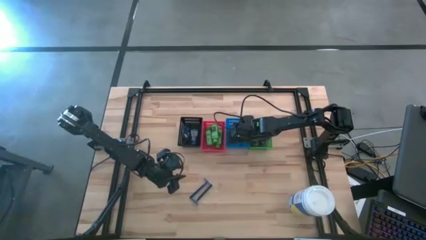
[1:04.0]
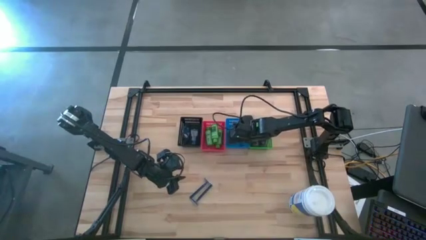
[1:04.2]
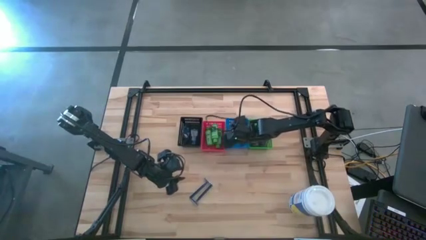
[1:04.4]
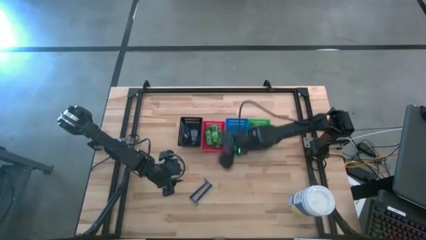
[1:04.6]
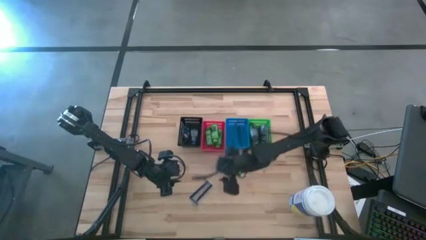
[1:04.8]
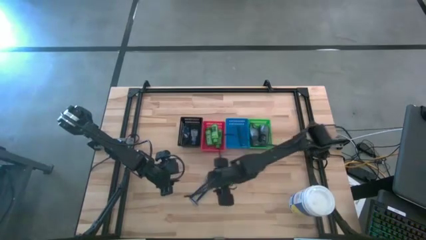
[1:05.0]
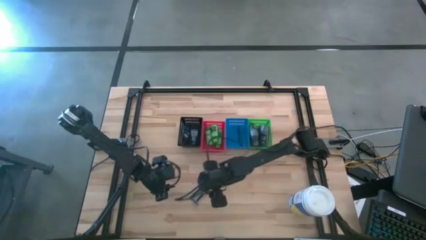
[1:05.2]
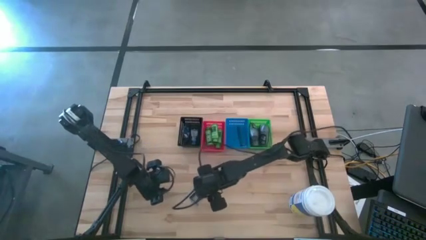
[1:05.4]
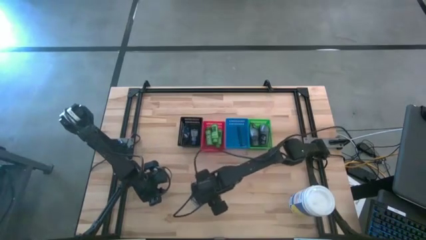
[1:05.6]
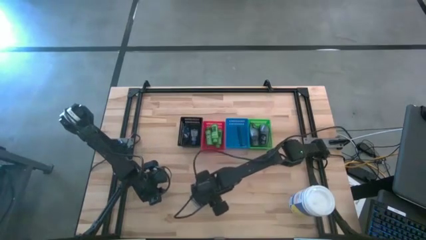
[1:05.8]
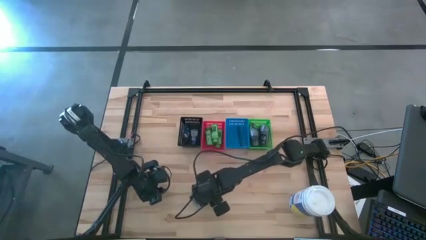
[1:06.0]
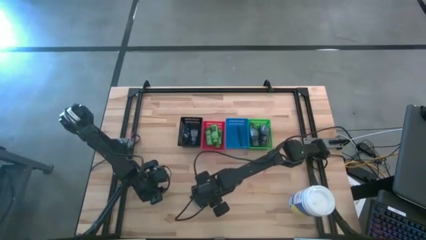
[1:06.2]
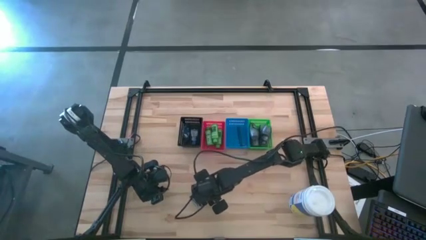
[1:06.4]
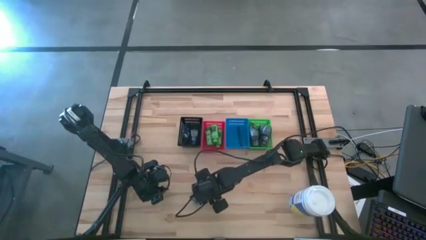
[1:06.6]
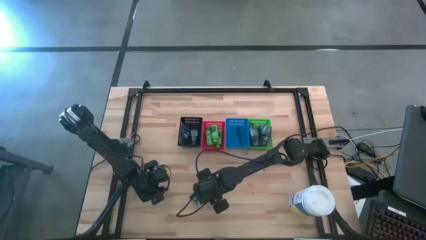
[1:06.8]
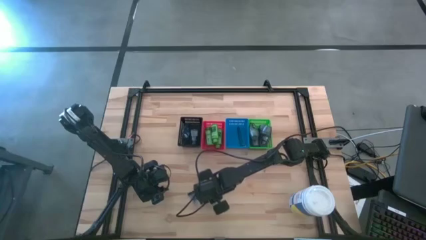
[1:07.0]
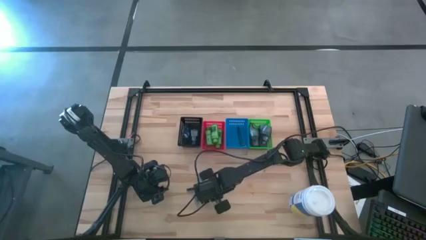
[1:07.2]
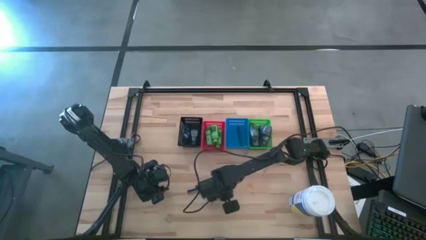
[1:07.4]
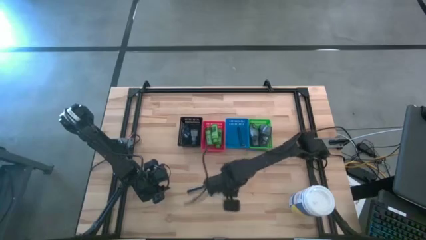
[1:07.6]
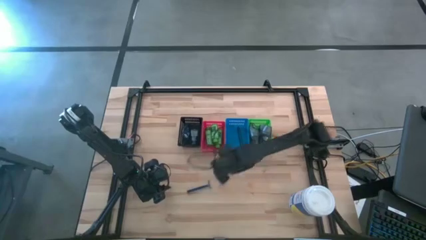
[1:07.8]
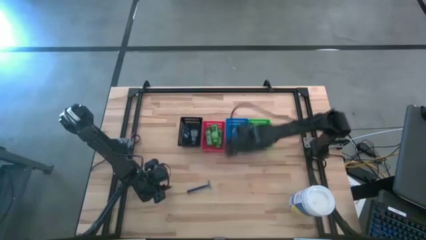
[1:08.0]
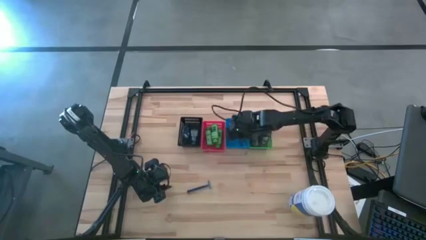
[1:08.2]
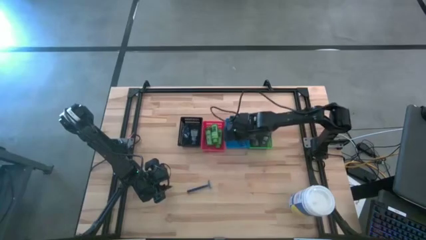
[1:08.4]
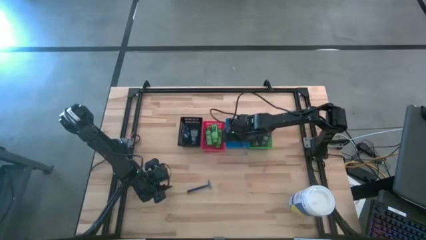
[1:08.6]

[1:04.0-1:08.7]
Task: Pick & Place Travel size toiletries
Put the blue razor into the blue basket

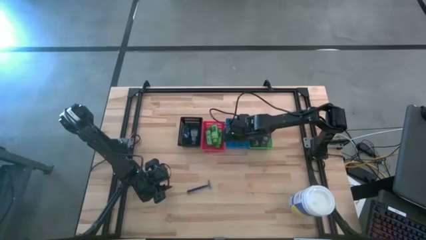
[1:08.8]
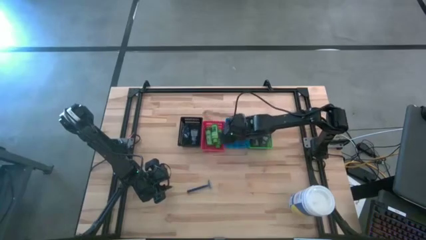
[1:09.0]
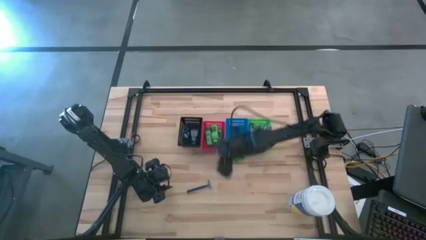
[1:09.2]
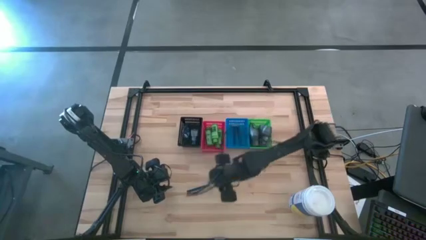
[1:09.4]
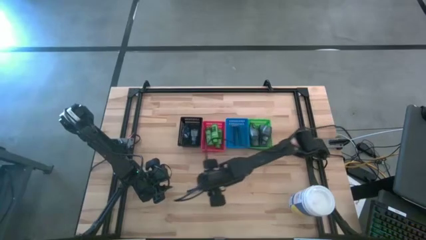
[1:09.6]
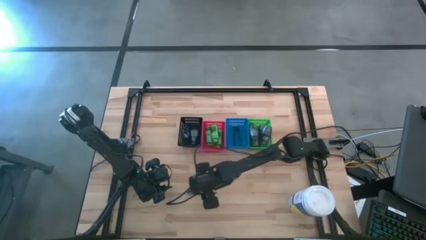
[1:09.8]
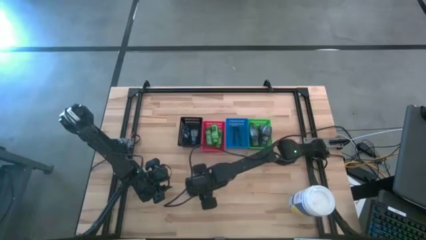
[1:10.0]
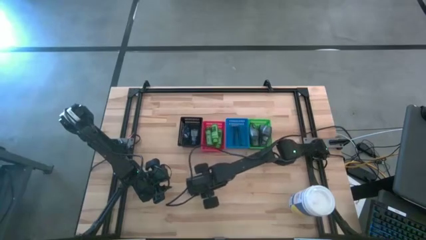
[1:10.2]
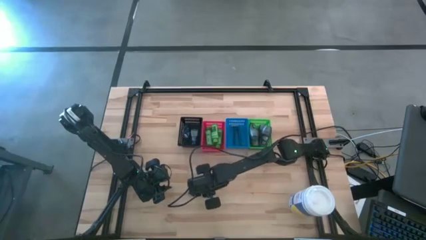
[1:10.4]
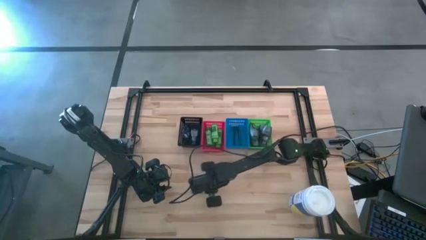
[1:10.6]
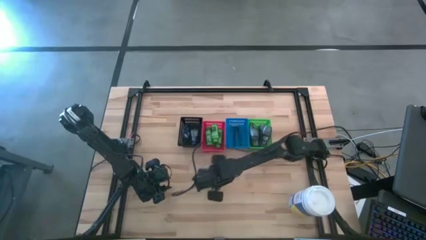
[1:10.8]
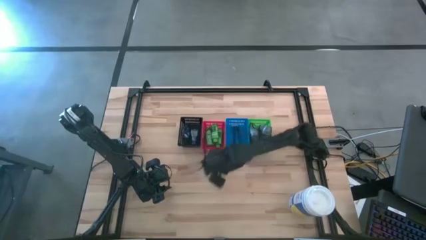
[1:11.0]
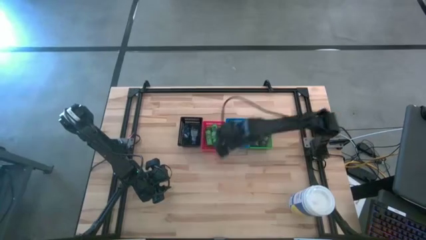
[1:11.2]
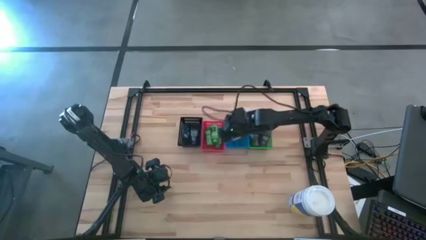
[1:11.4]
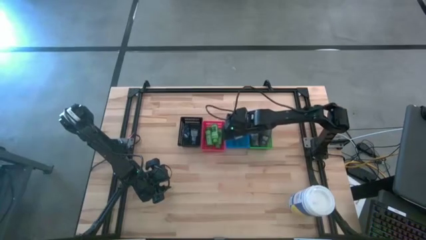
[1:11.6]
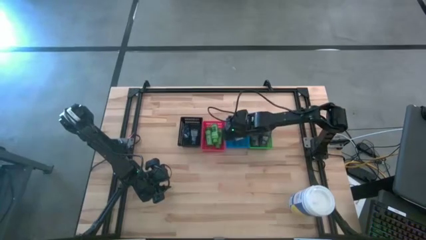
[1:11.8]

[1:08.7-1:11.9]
Put the blue razor into the blue basket

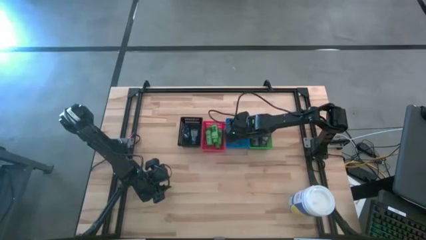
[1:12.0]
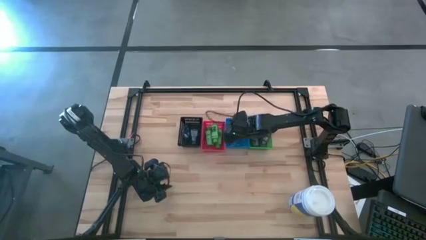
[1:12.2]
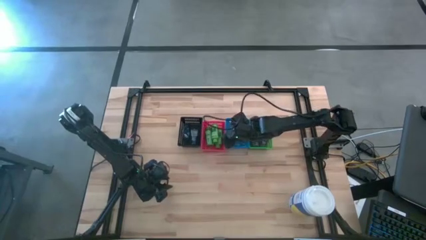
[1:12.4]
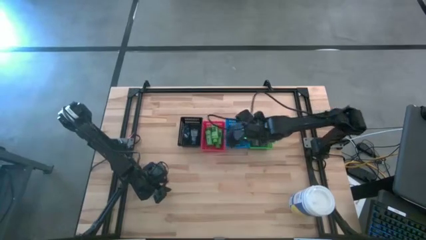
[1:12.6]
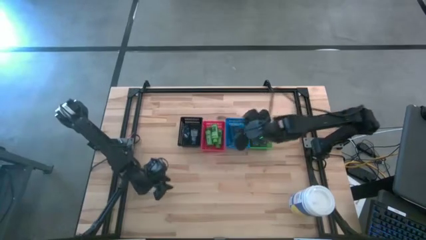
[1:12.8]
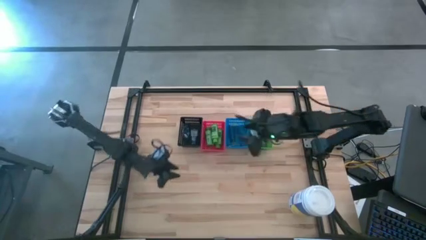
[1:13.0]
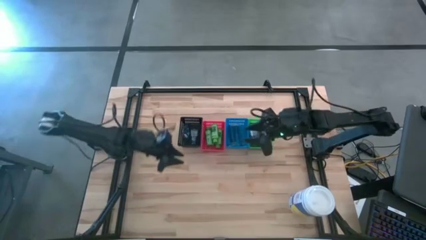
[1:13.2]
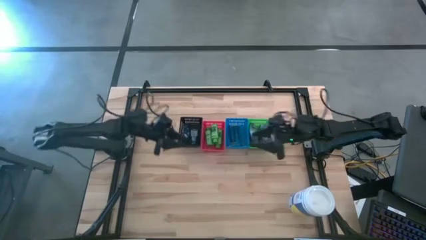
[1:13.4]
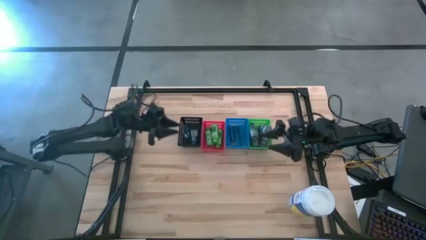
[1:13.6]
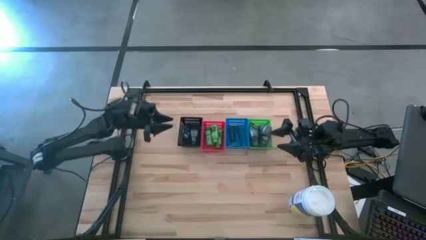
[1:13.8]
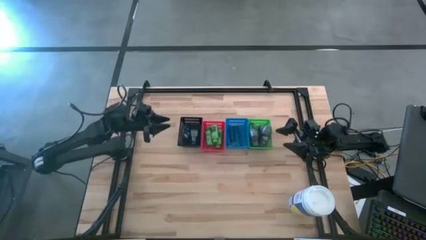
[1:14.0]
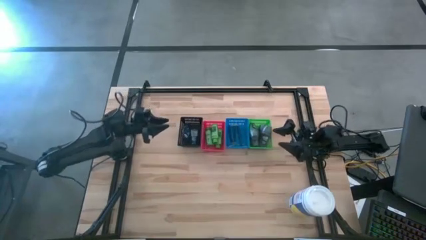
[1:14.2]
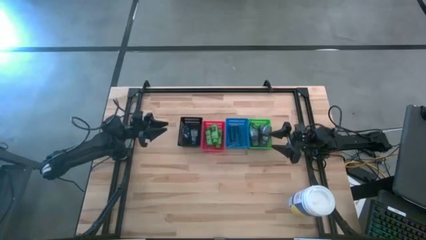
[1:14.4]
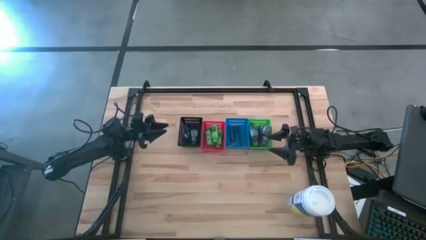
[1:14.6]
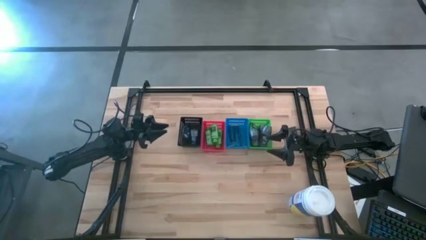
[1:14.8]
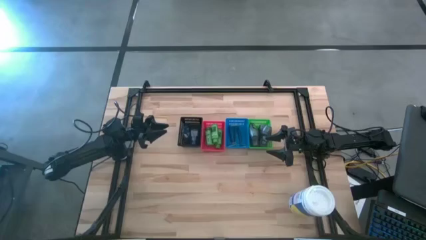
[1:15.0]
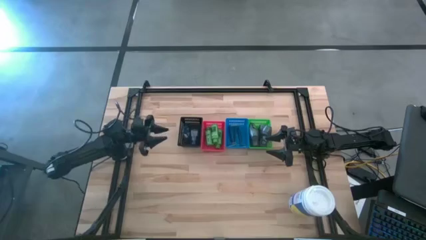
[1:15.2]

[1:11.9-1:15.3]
Return to Home Position

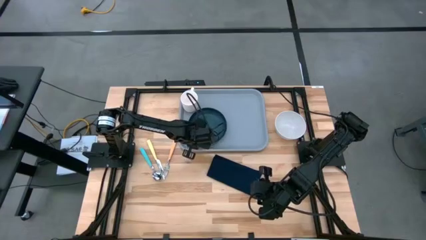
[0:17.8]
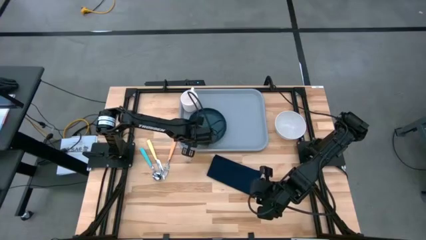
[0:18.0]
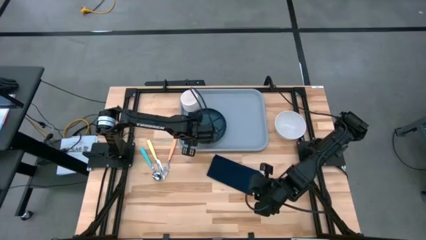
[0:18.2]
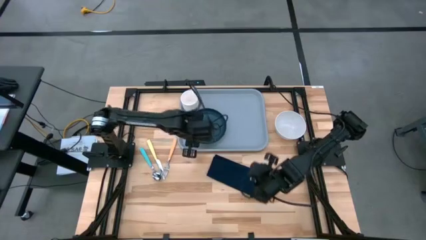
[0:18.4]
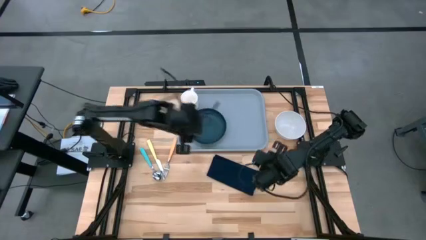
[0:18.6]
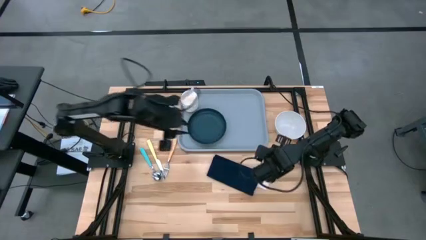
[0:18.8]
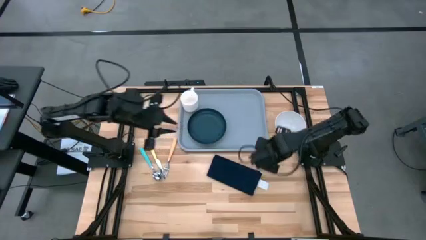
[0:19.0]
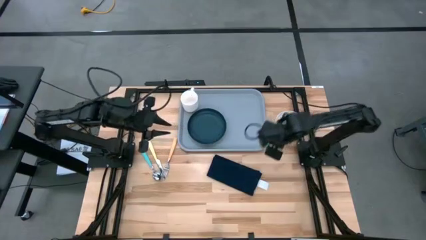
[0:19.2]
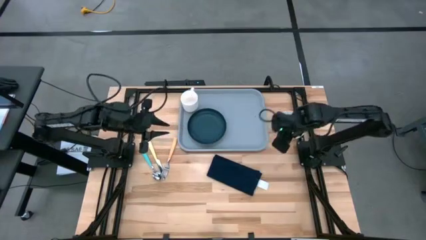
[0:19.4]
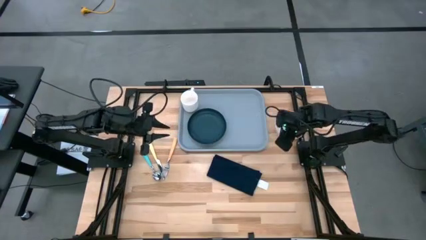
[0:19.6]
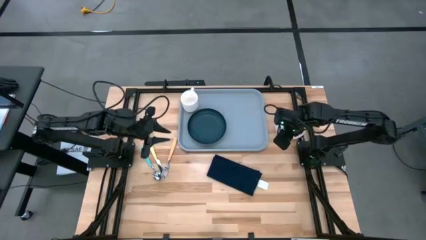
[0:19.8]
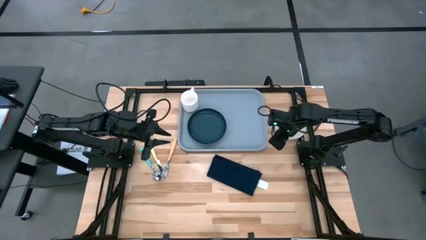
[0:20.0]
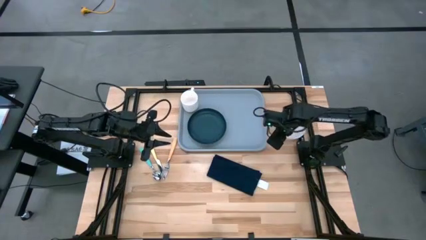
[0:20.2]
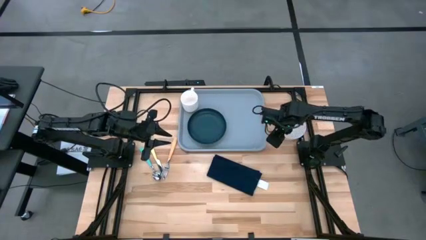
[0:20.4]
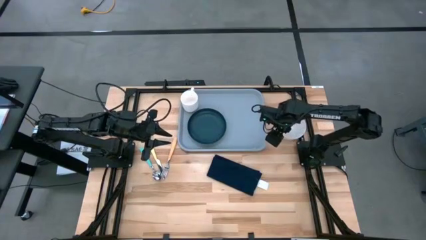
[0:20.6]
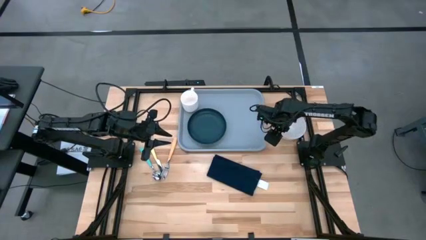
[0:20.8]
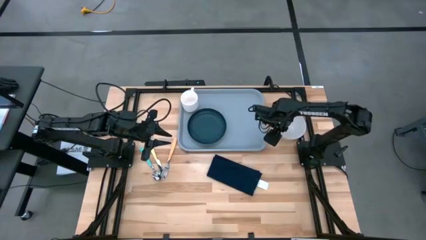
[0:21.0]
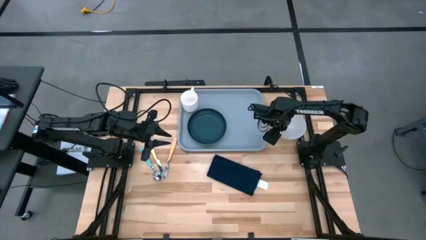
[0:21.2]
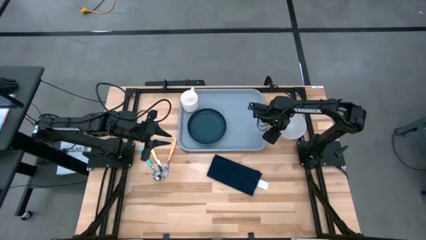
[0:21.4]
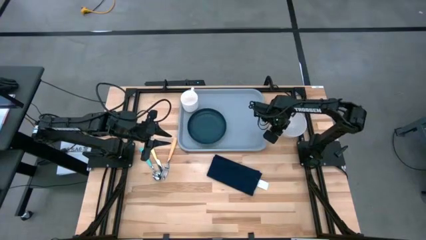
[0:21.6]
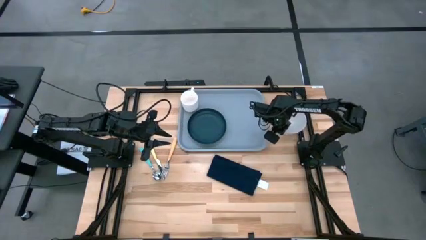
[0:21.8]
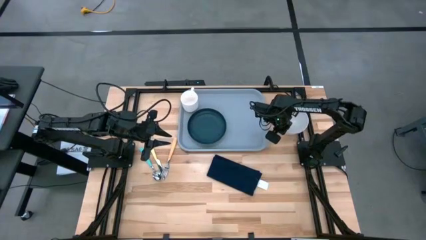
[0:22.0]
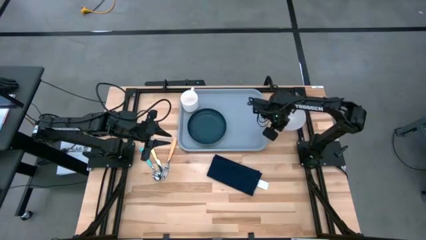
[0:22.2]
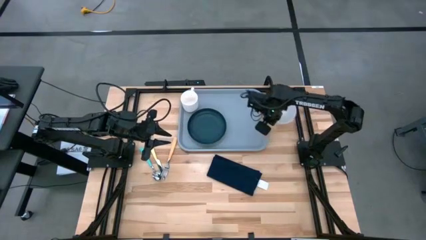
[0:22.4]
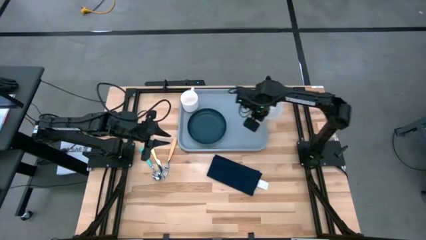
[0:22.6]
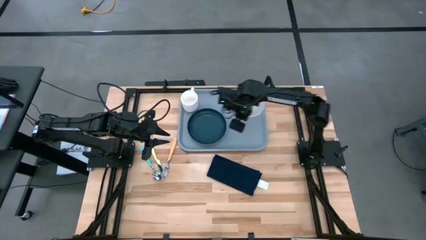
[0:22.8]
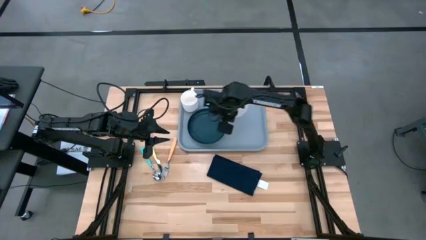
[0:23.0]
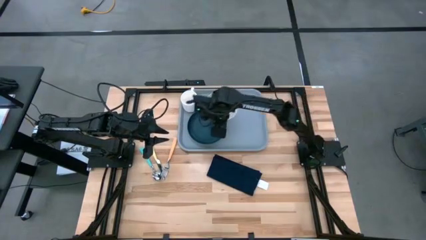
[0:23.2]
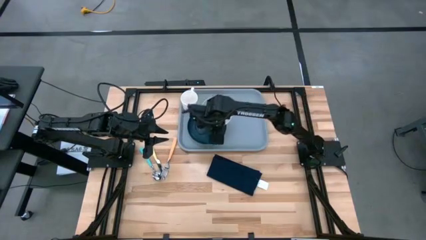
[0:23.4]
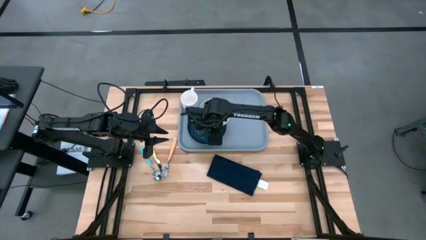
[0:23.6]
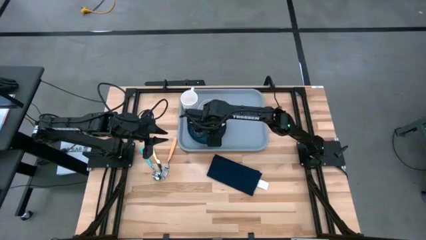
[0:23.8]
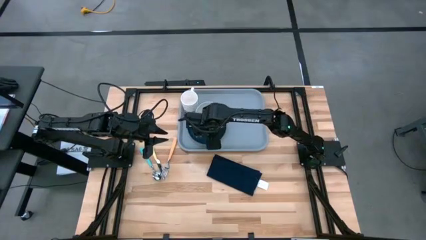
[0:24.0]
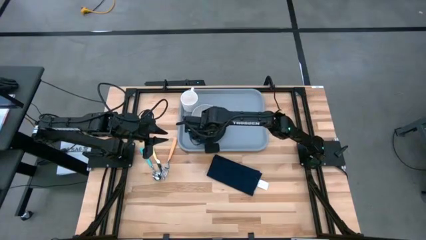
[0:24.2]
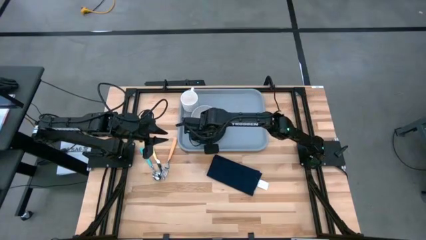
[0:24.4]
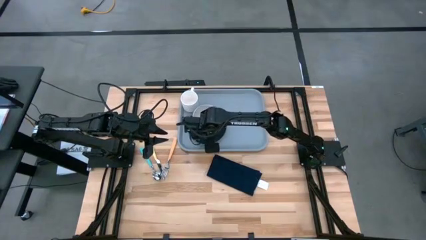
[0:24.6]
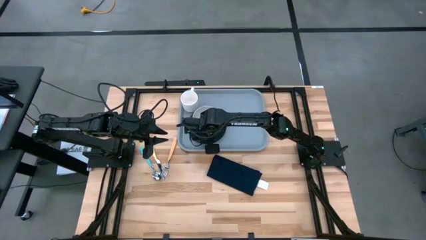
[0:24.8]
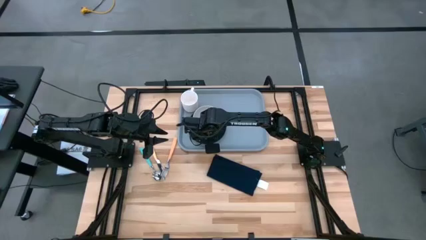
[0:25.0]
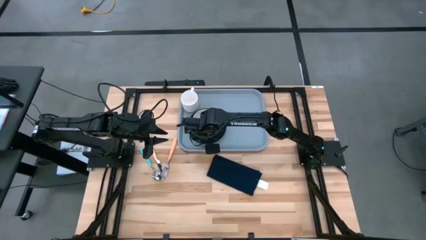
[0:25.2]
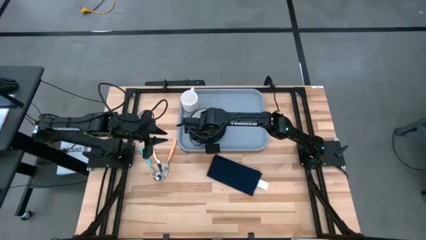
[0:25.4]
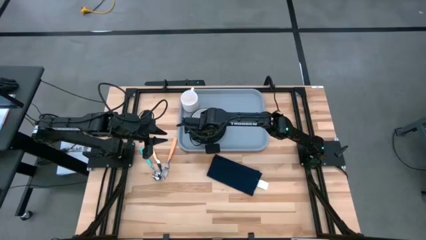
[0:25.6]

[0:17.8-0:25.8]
Task: Set up tray
Put the white bowl on top of the dark blue plate on the gray table tray
